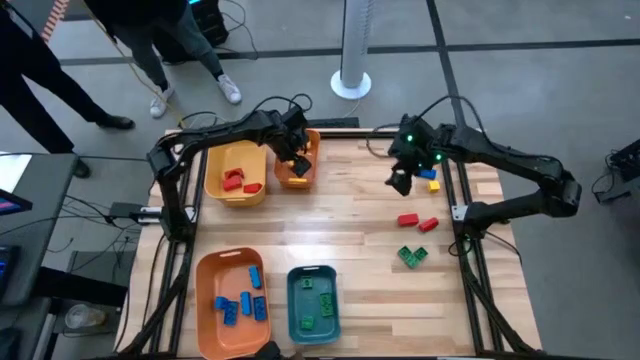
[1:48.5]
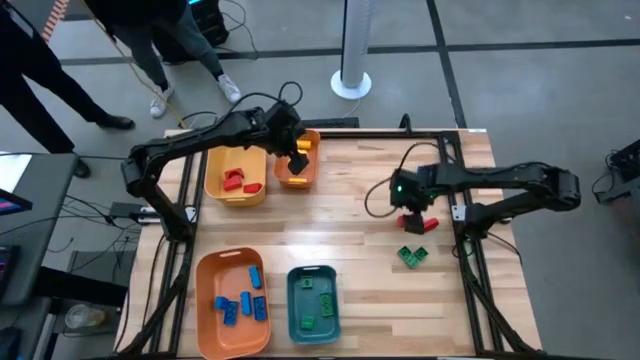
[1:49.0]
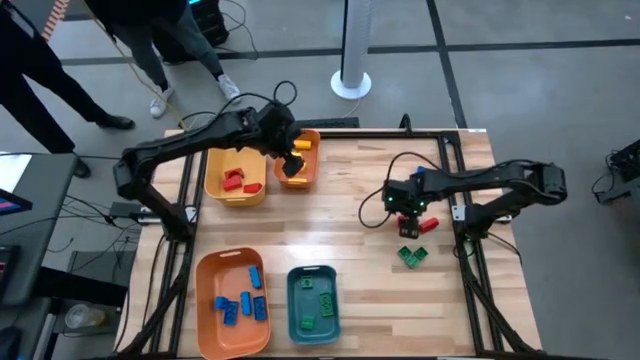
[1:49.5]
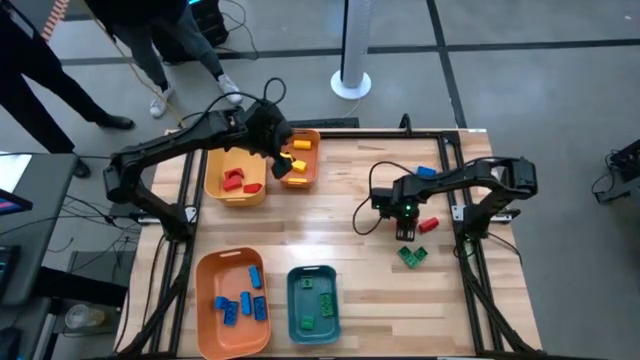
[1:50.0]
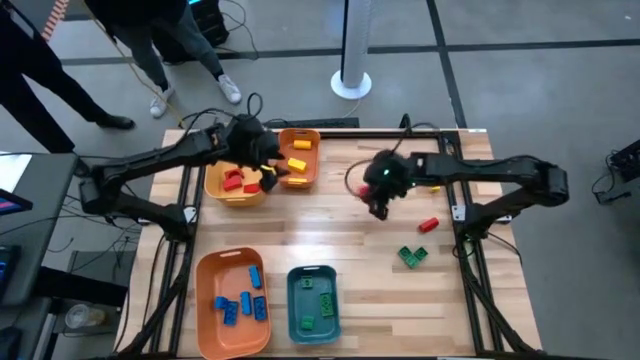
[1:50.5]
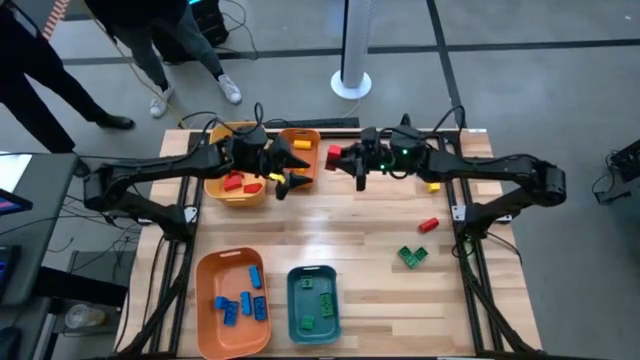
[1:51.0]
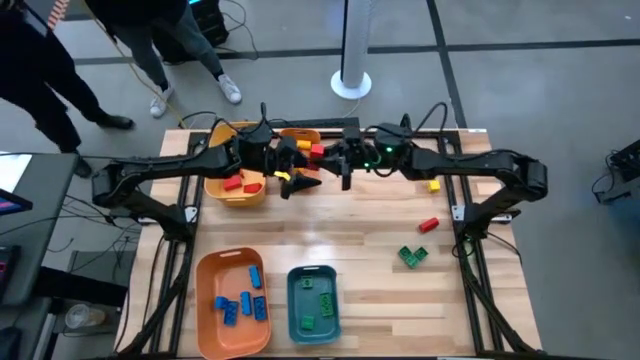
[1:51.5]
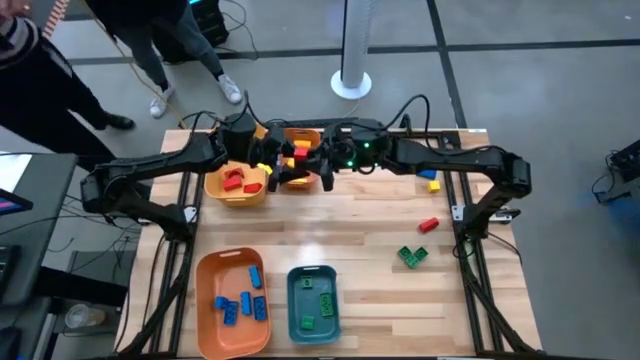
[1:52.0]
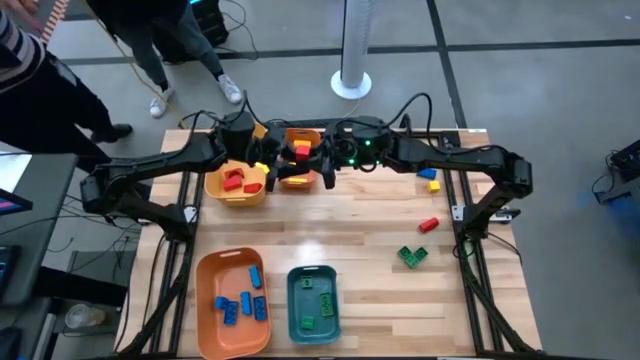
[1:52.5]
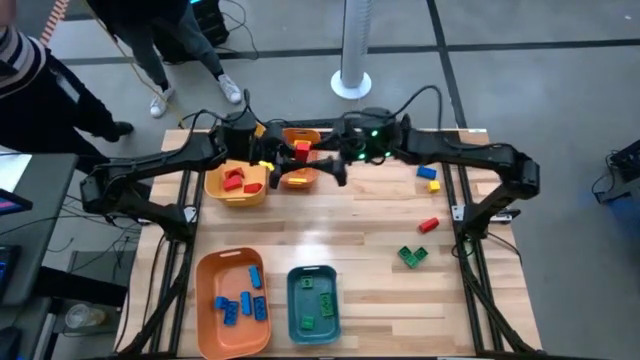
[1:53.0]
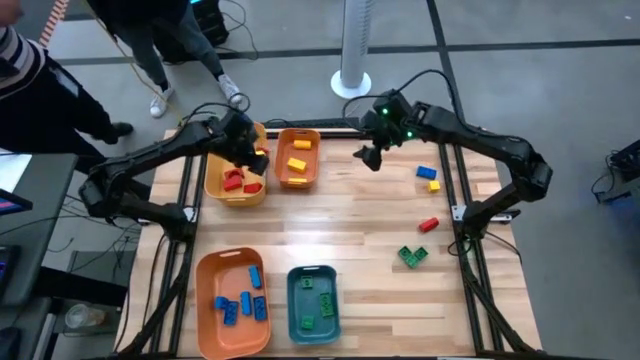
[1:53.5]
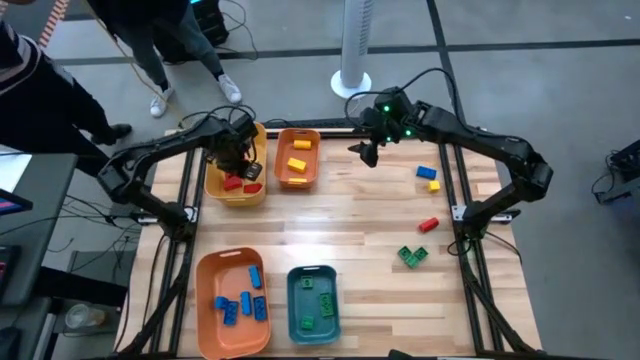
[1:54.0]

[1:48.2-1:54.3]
Task: Sort blocks
Put the red wooden block into the yellow bin

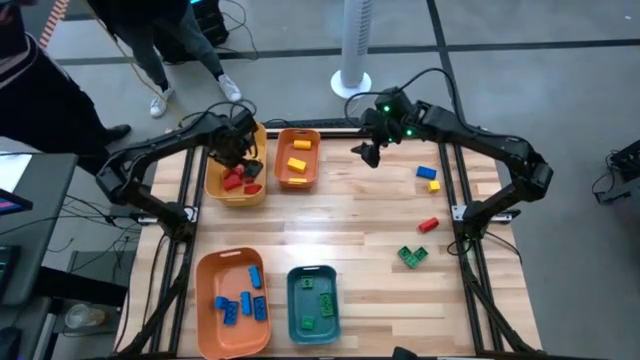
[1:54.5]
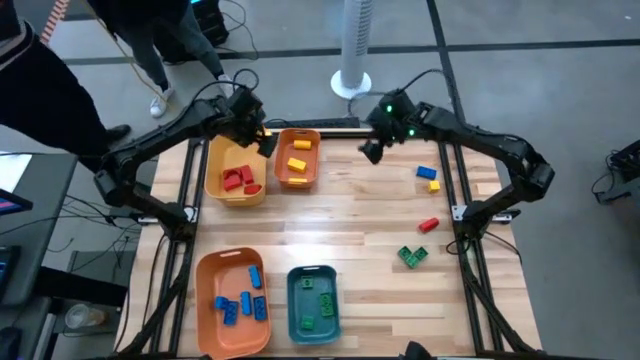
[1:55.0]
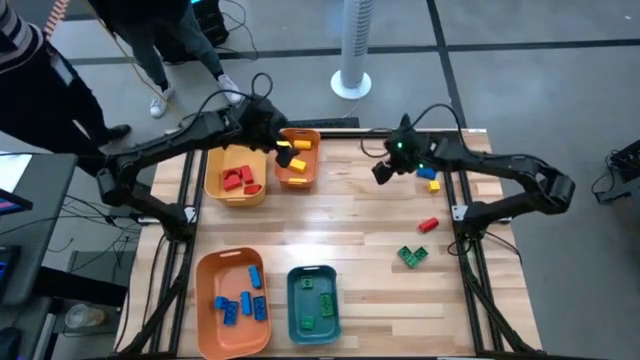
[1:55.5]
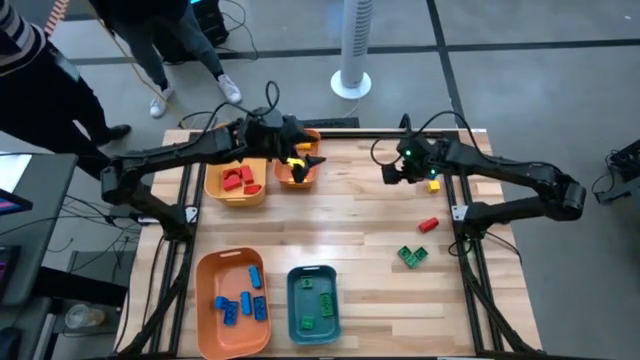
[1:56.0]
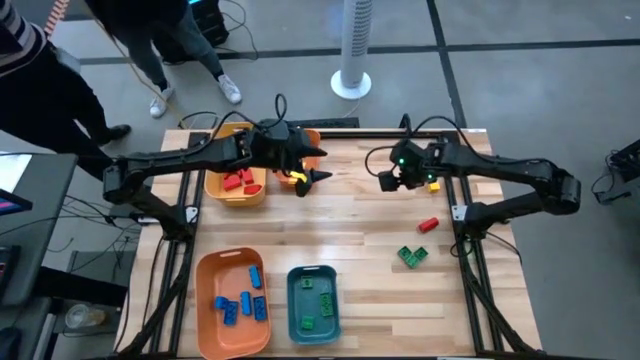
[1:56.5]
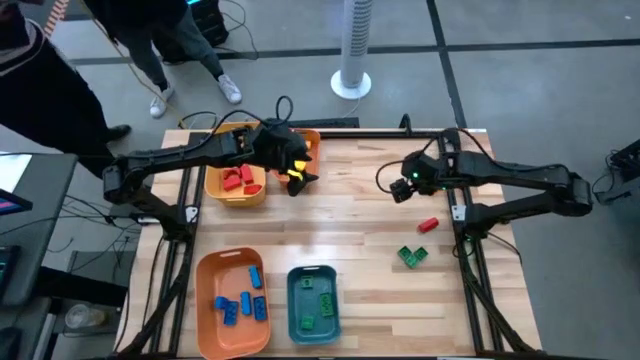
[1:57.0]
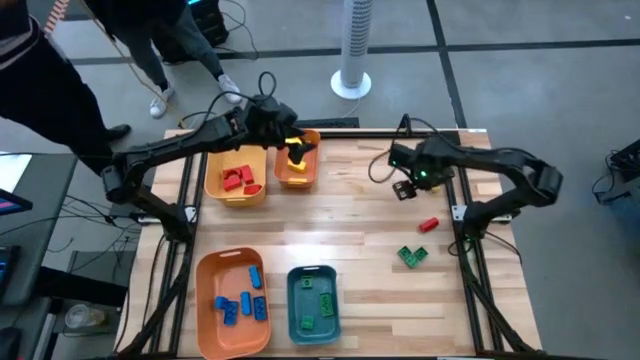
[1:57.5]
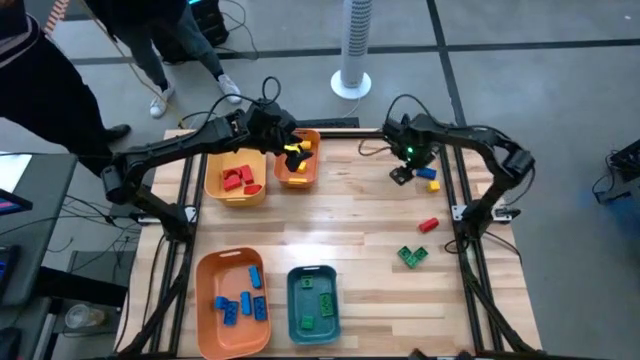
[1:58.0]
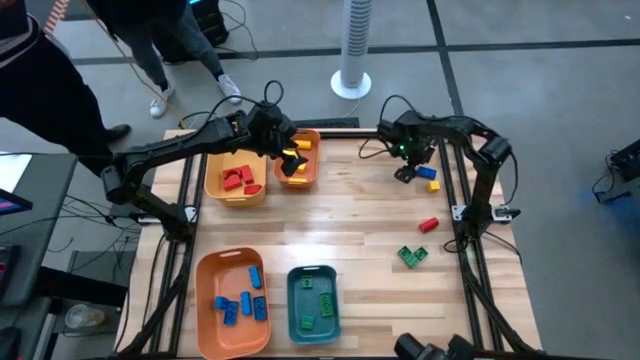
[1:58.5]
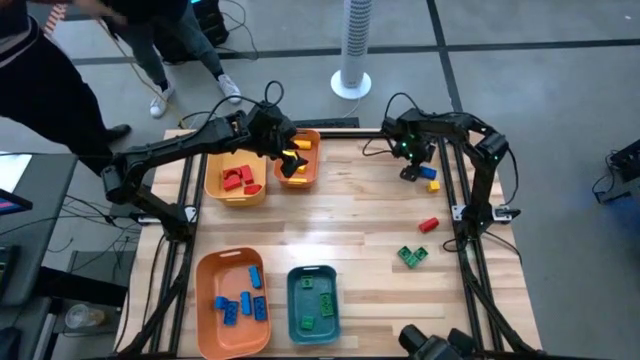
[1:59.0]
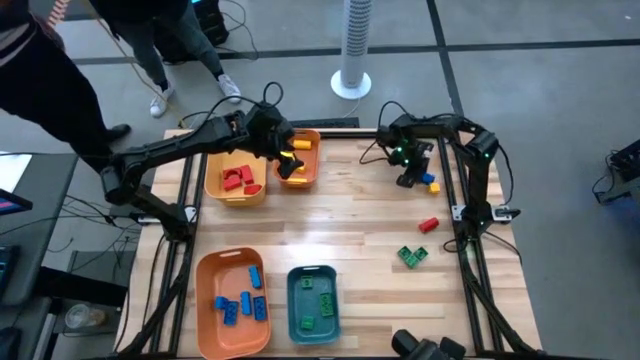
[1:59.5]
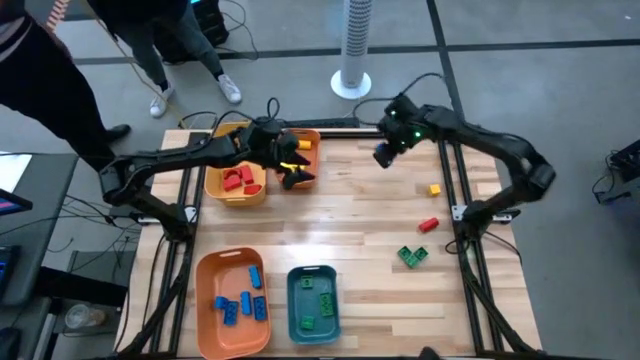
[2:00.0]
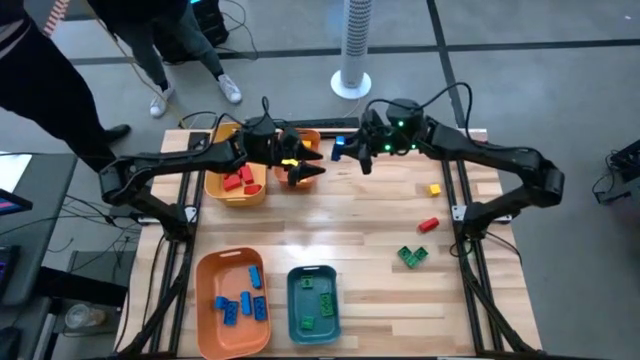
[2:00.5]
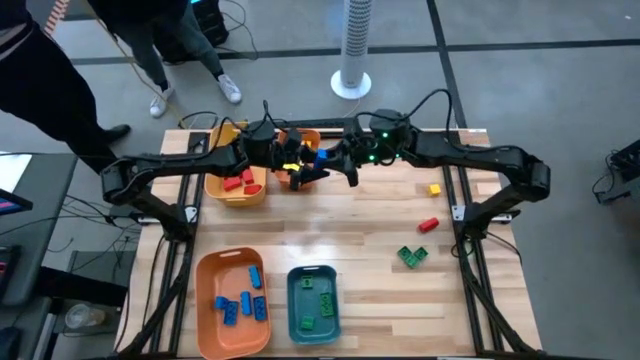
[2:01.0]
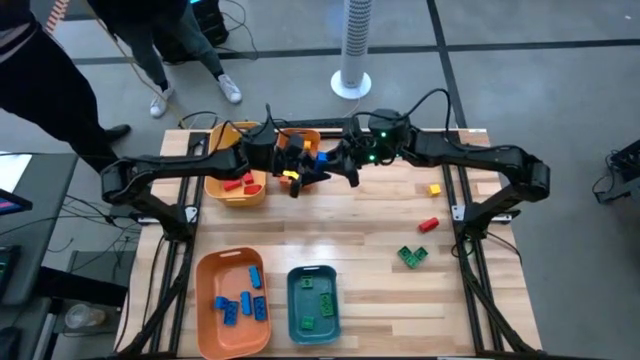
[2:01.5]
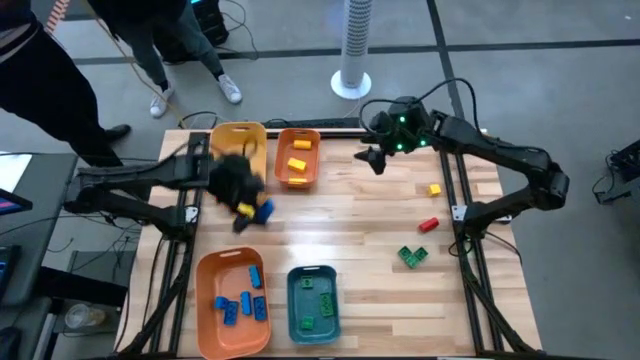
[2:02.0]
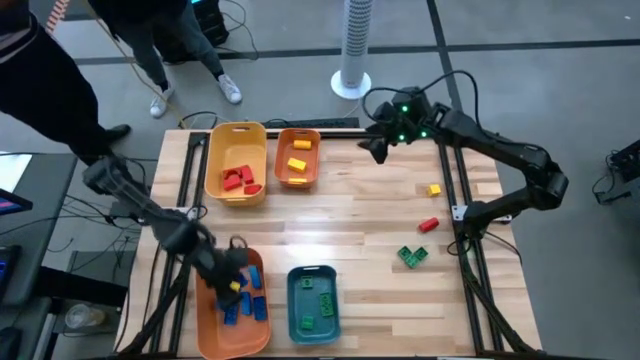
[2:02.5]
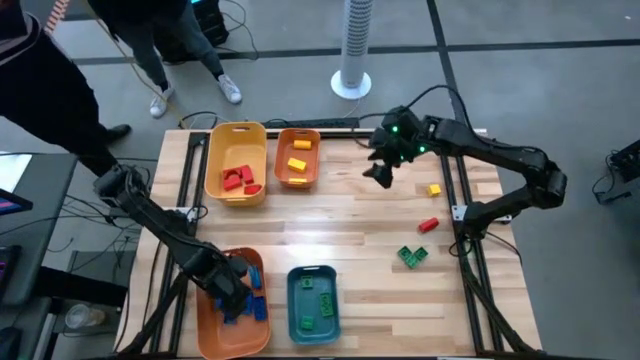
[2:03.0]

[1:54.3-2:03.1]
Put the blue game piece into the large orange bin

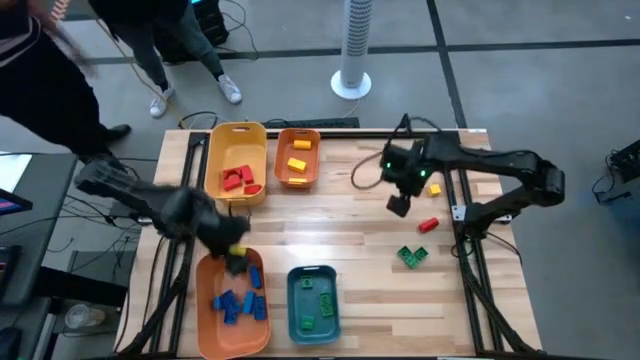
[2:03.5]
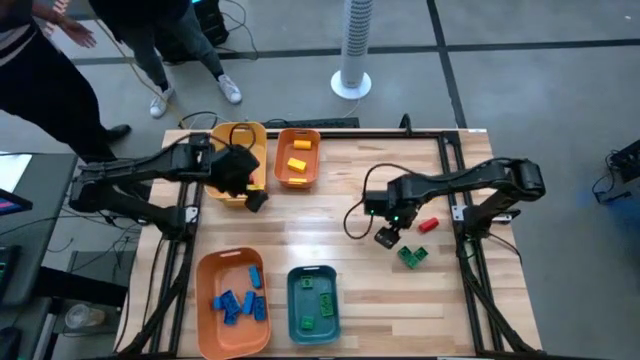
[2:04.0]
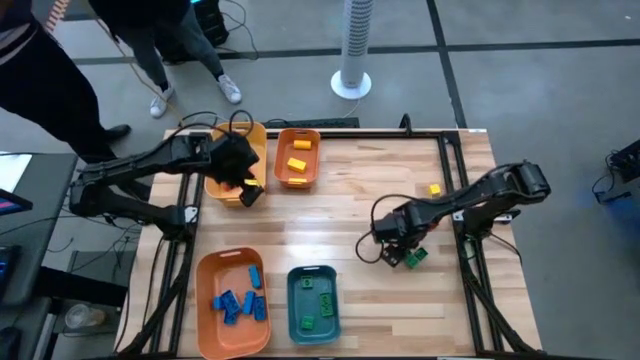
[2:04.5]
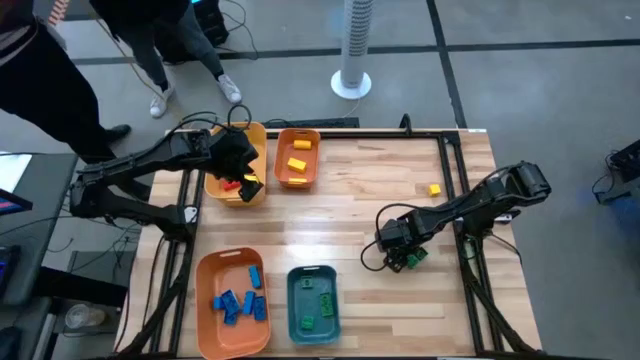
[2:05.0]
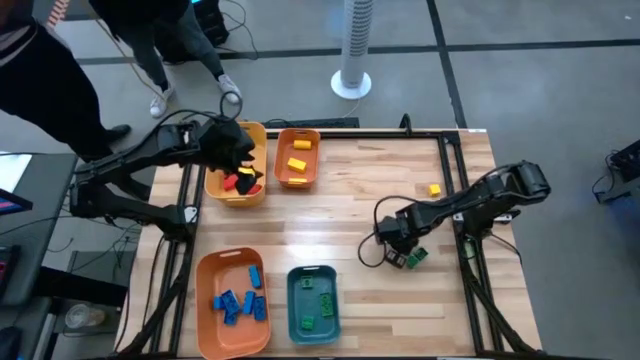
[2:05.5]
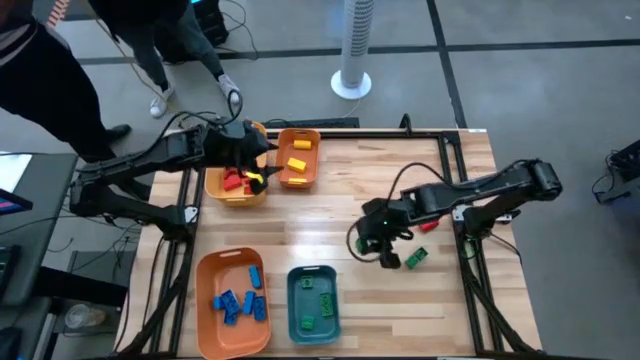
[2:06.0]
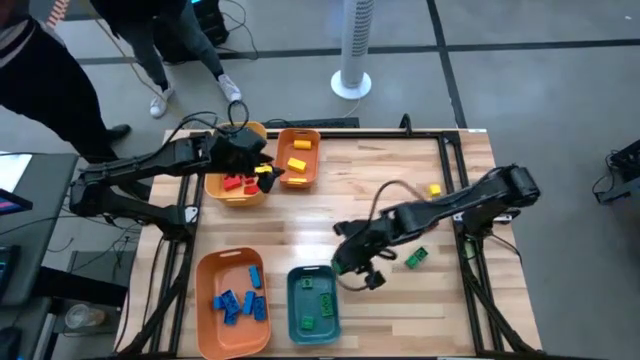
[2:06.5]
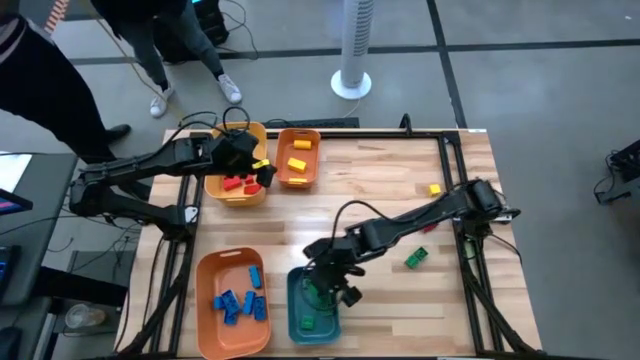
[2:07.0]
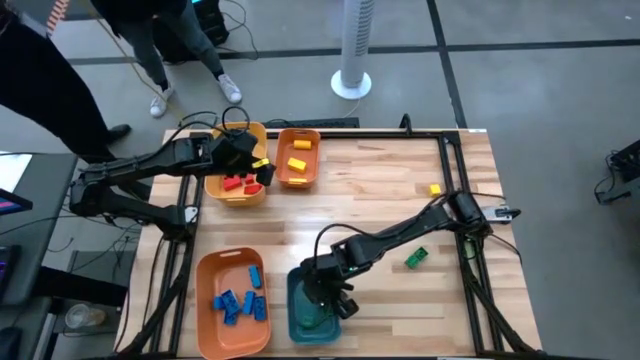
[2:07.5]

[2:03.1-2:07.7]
Put the green game piece into the blue bin

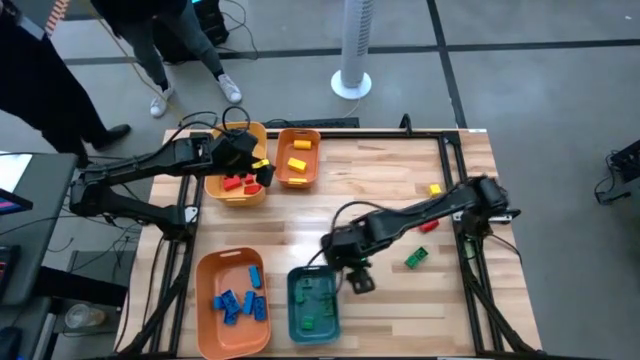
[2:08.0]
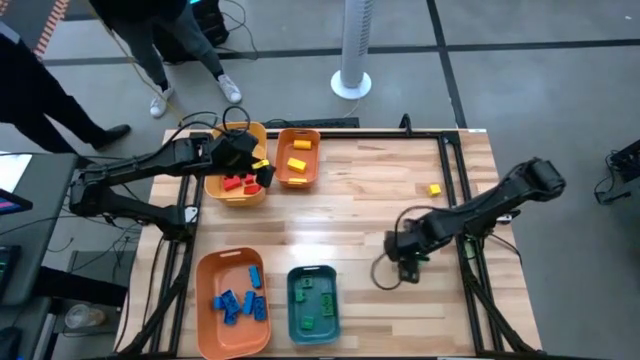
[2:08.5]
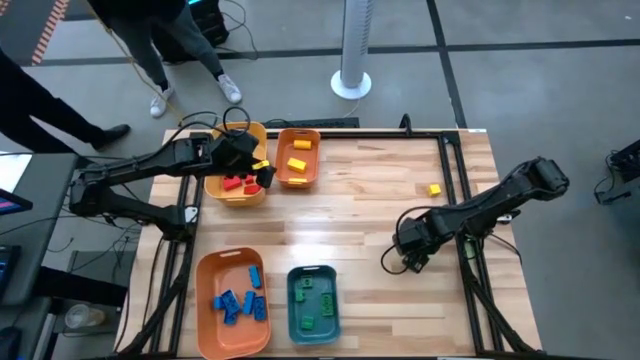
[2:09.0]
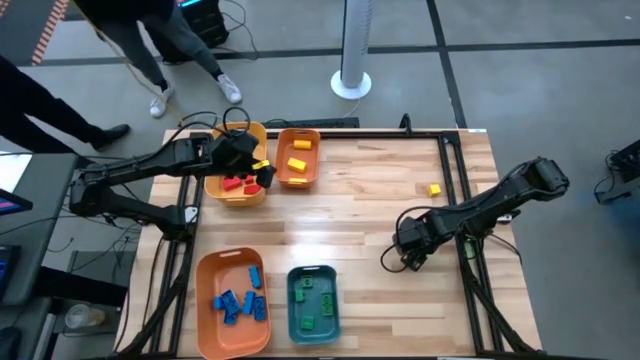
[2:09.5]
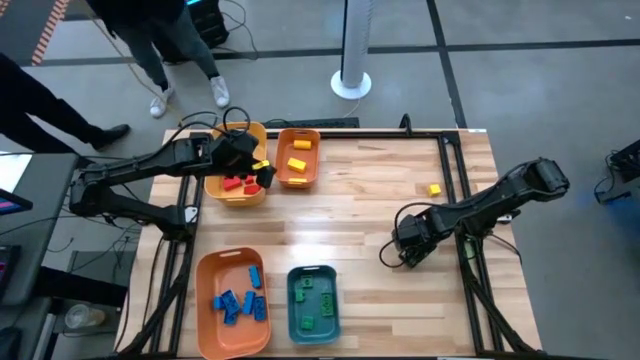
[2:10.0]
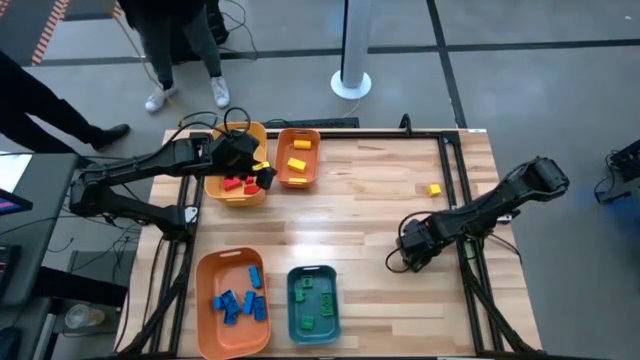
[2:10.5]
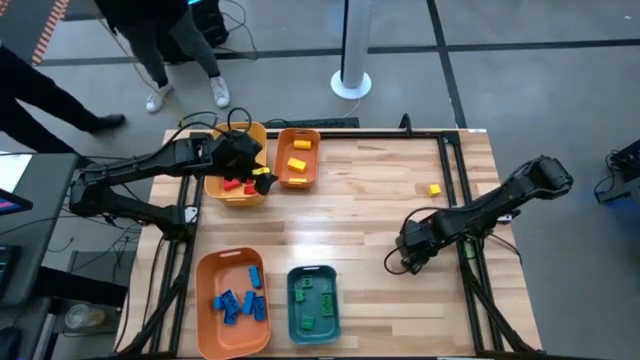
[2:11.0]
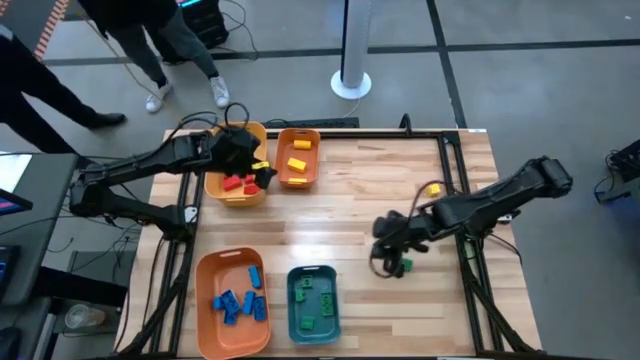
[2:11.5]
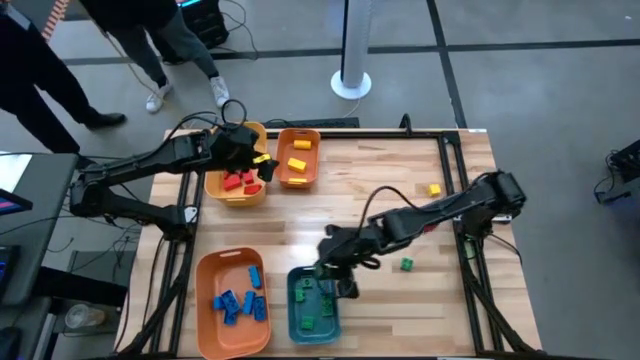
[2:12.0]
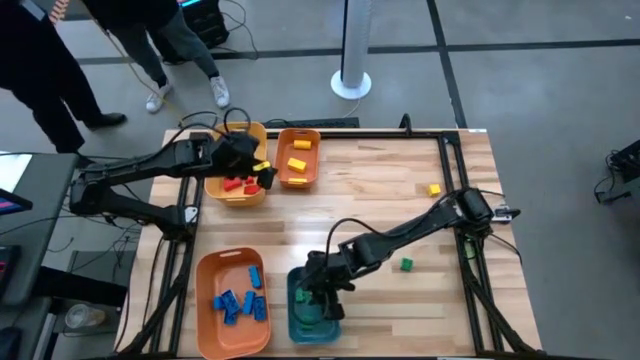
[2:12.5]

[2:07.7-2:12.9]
Put the green game piece into the blue bin
